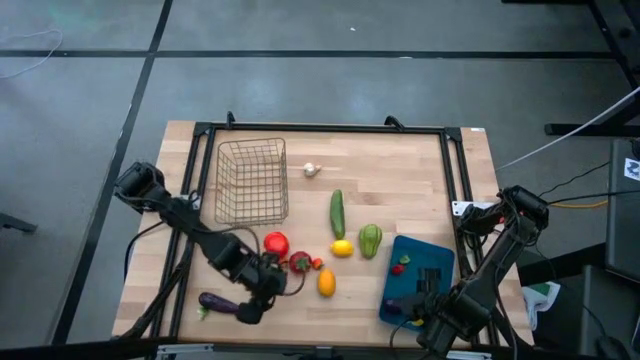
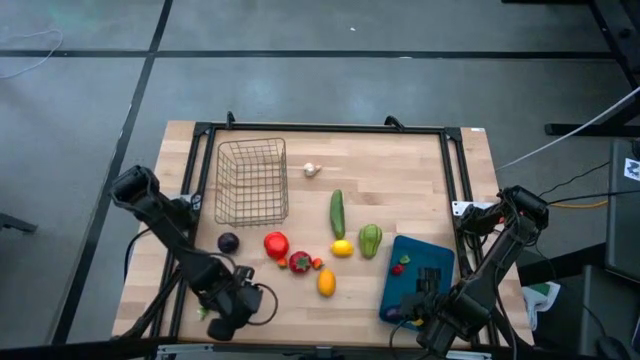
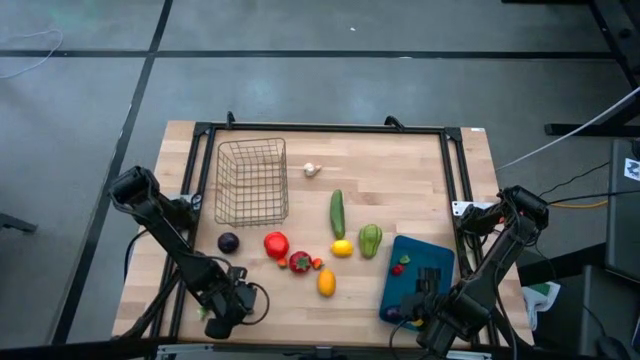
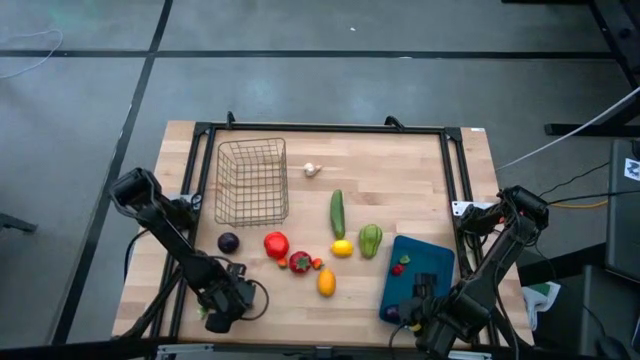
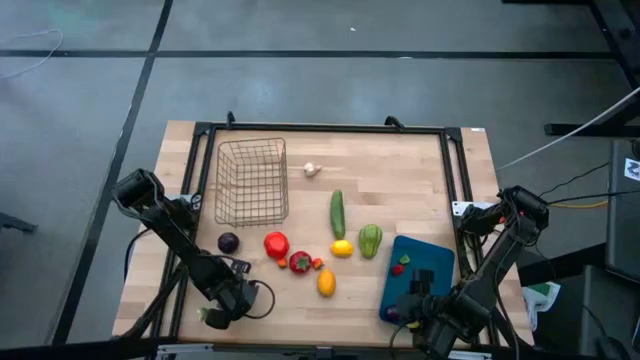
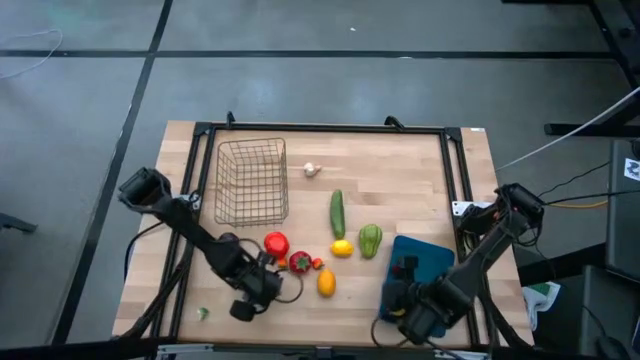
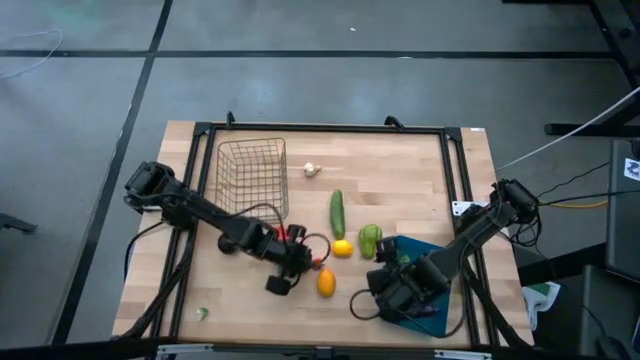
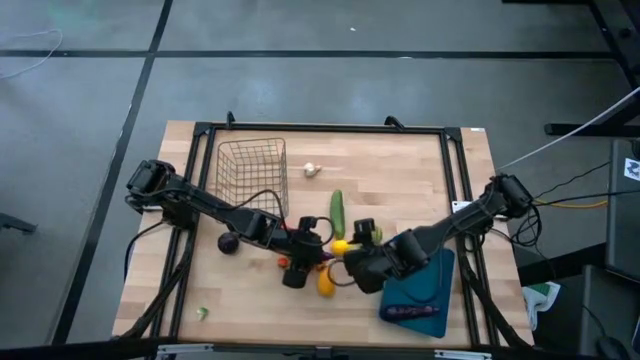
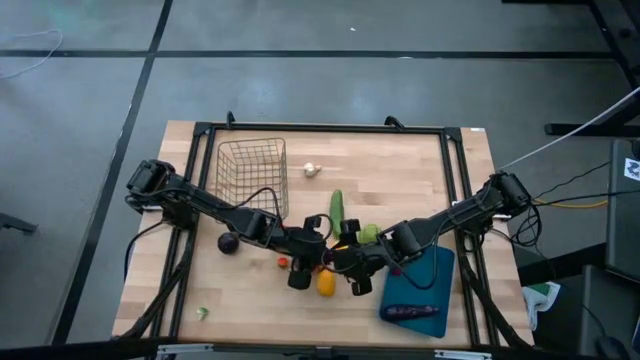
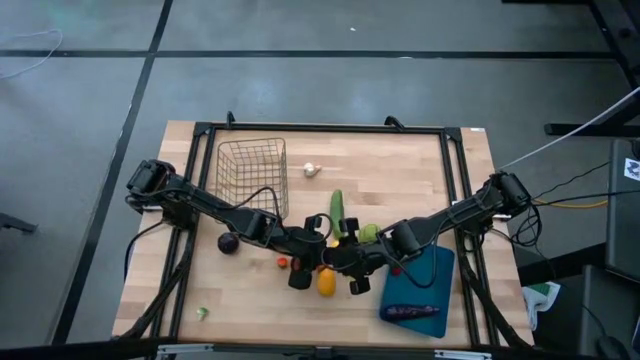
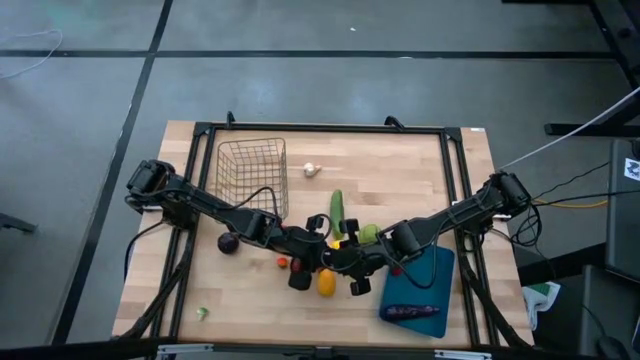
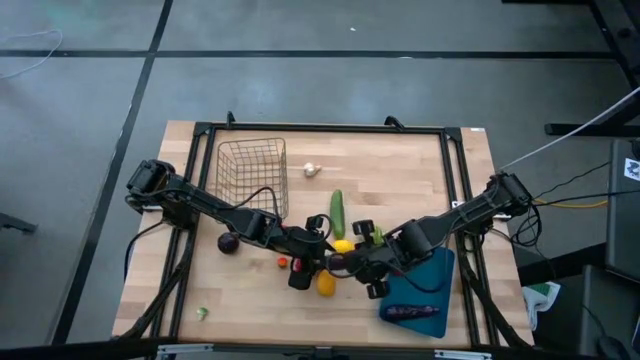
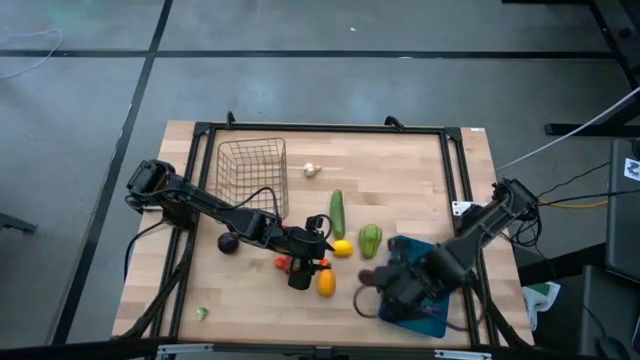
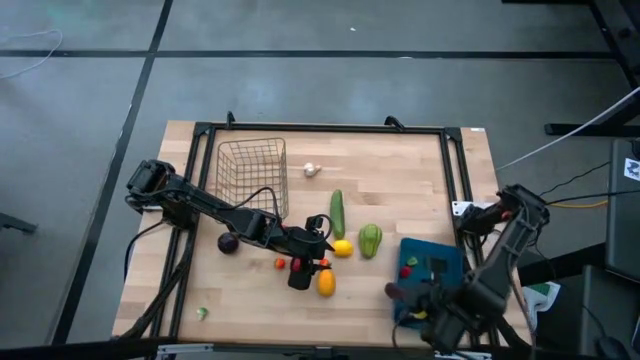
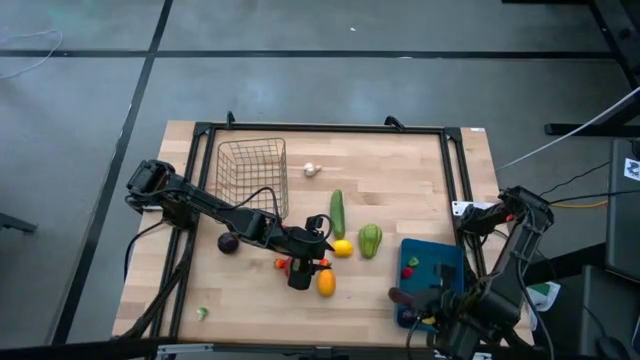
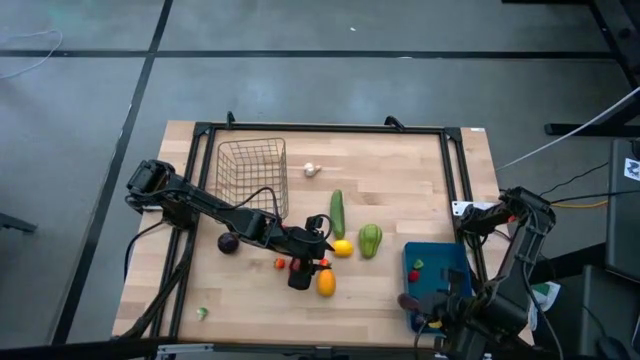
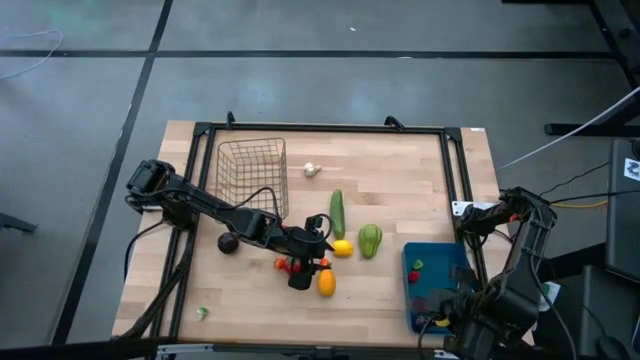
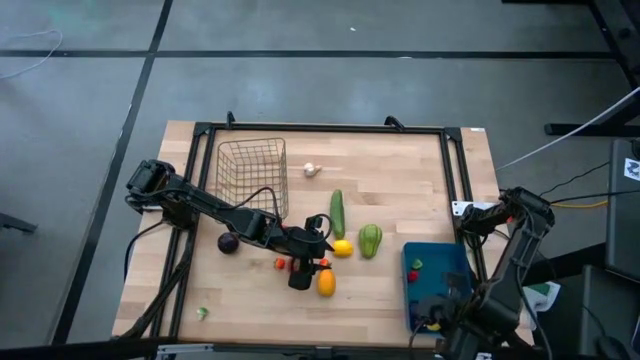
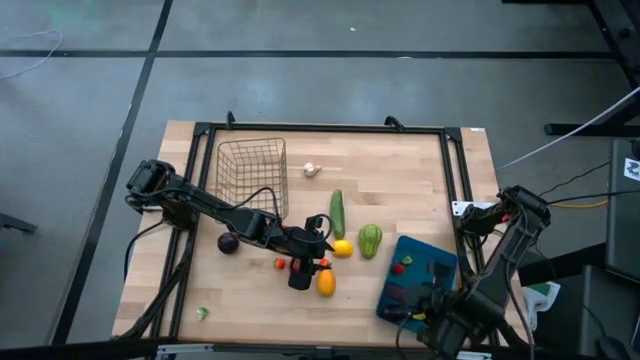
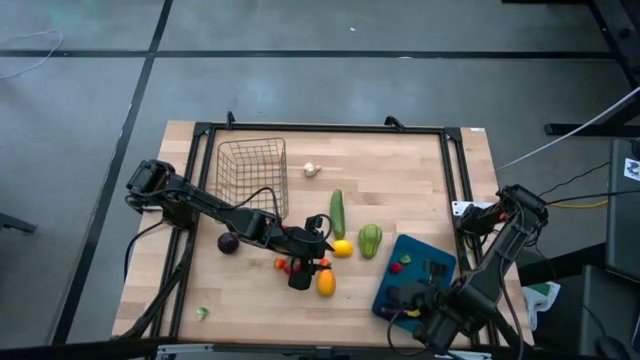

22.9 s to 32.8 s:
Task: Sort produce into baskets
Put the violet eggplant into the blue bin

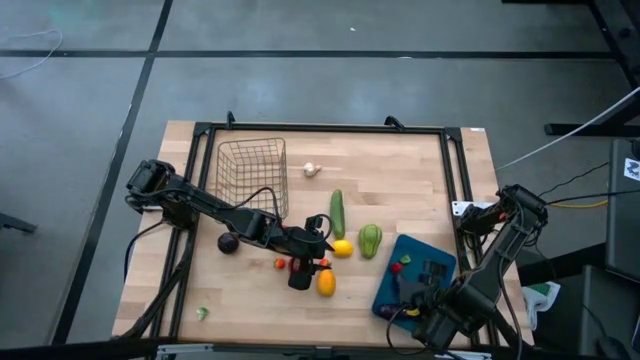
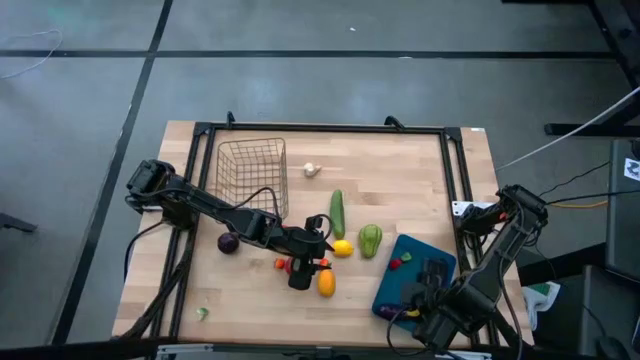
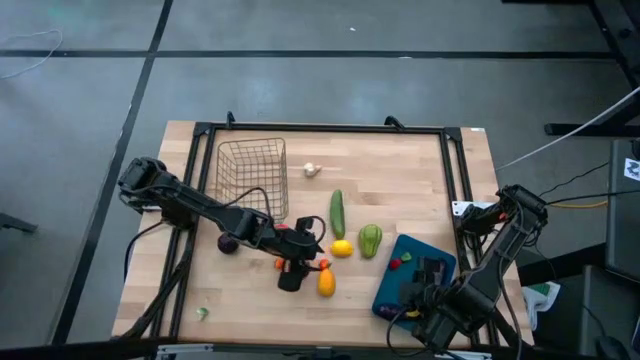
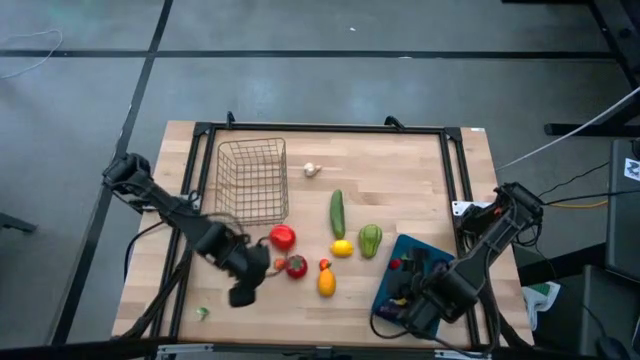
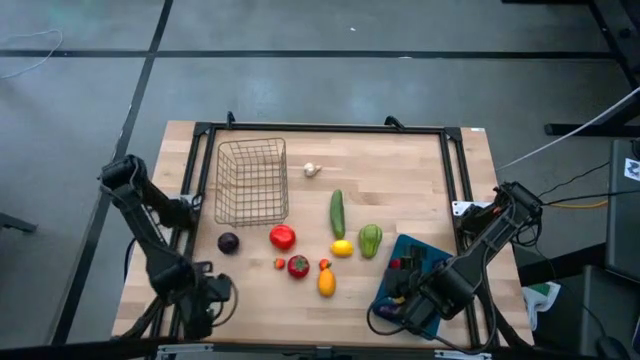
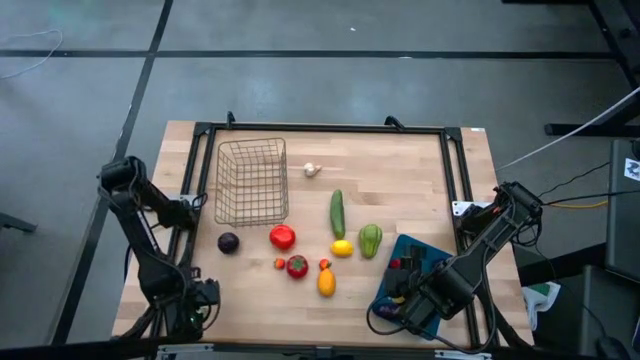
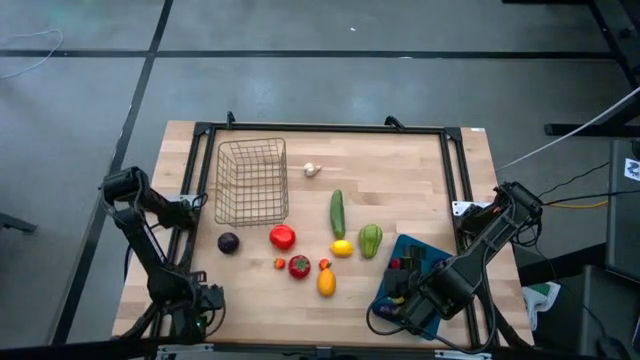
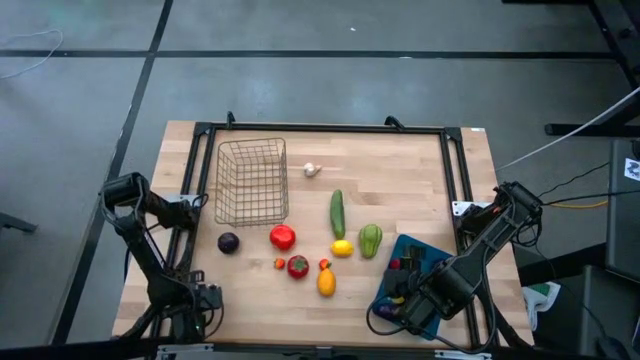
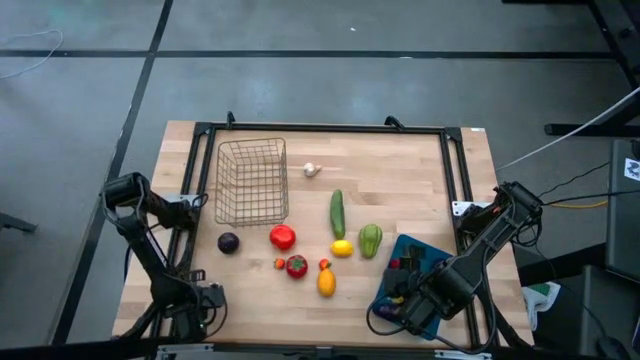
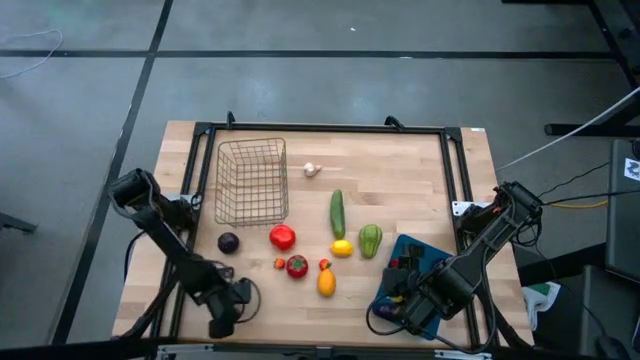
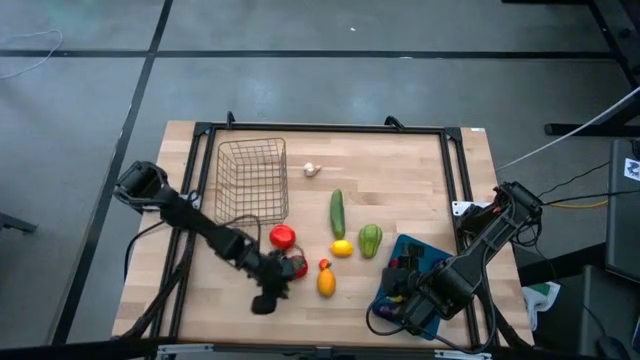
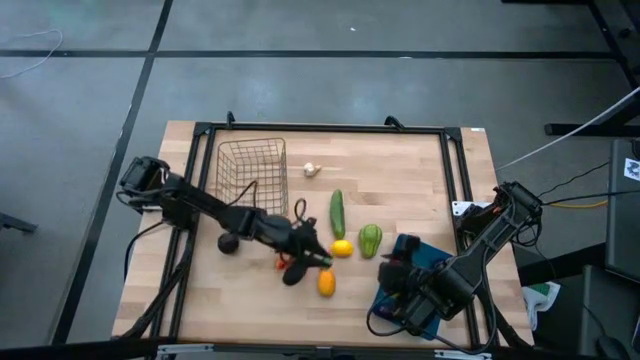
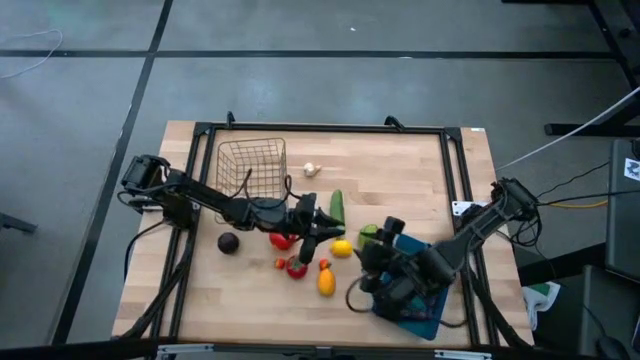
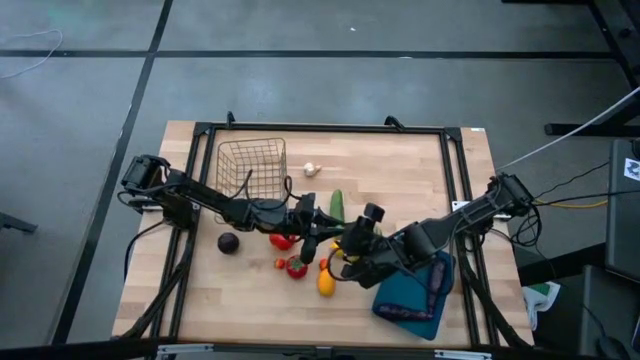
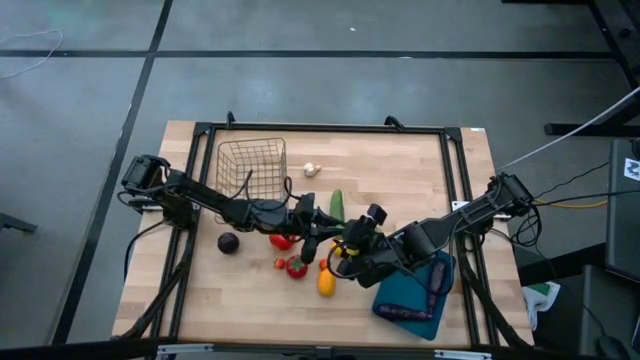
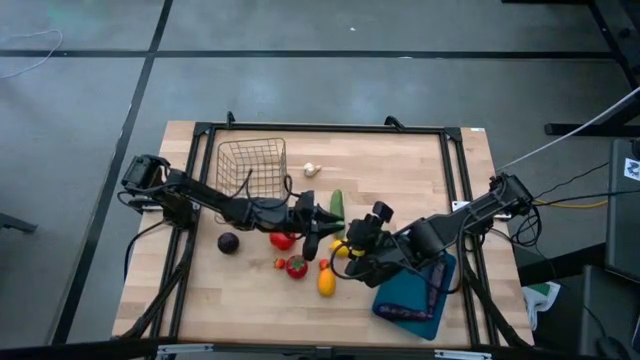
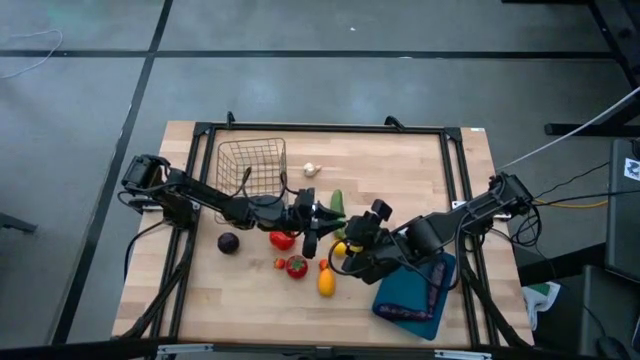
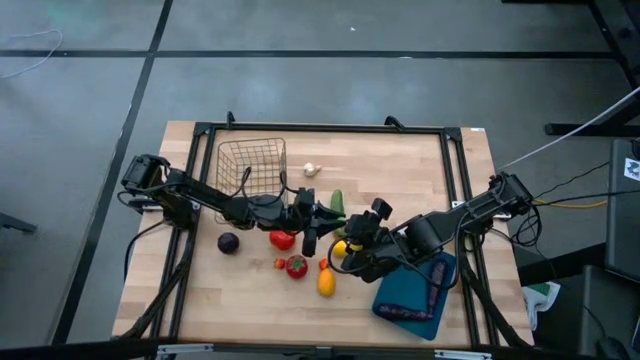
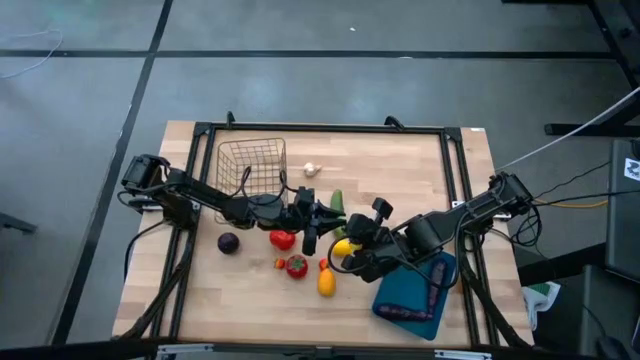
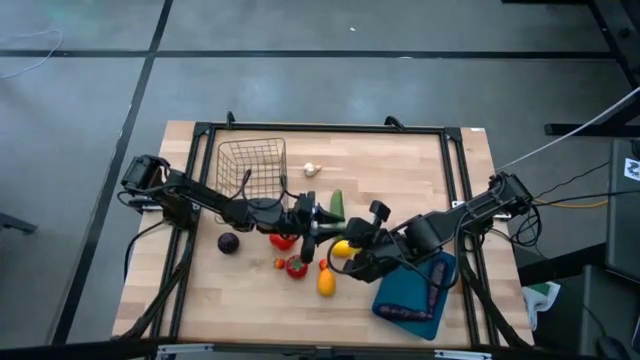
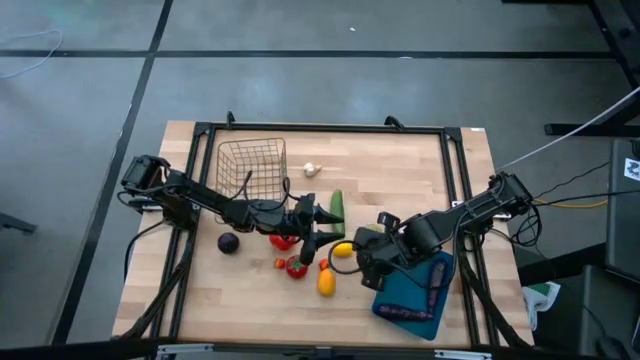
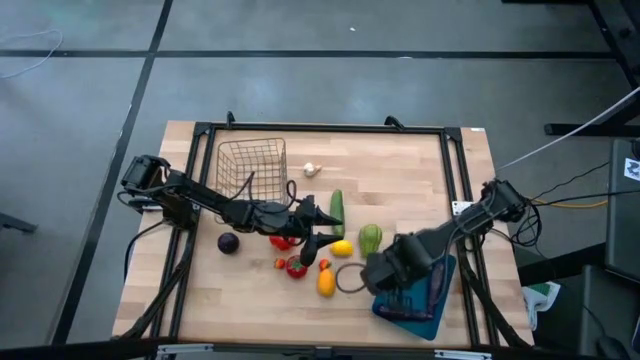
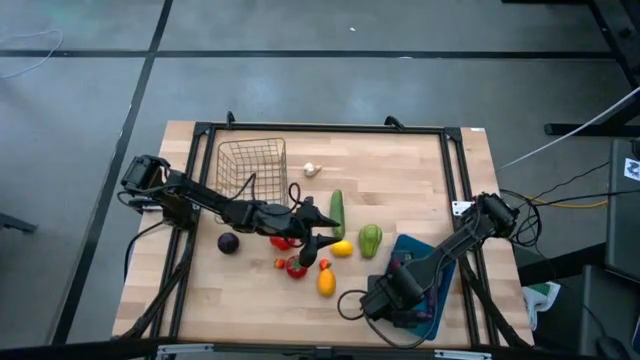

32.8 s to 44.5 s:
Put the green mushroom into the blue bin
